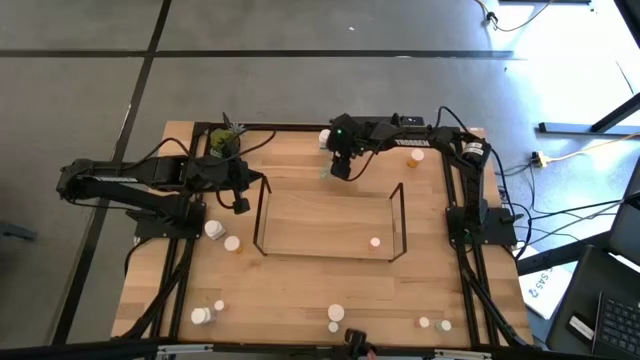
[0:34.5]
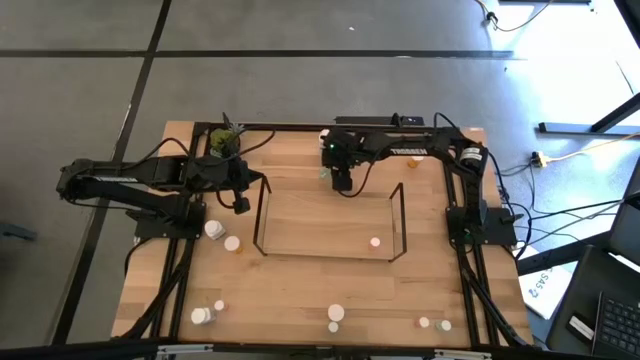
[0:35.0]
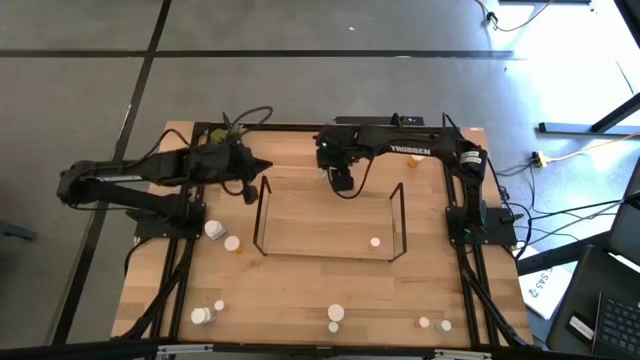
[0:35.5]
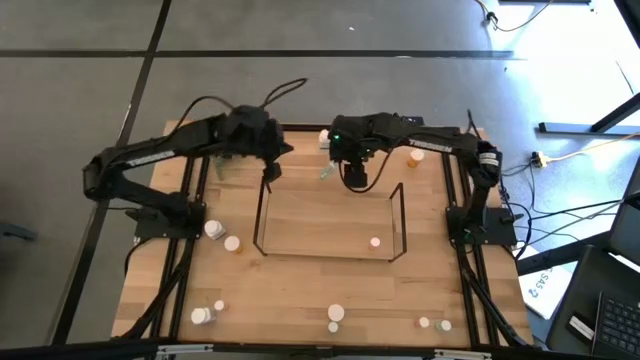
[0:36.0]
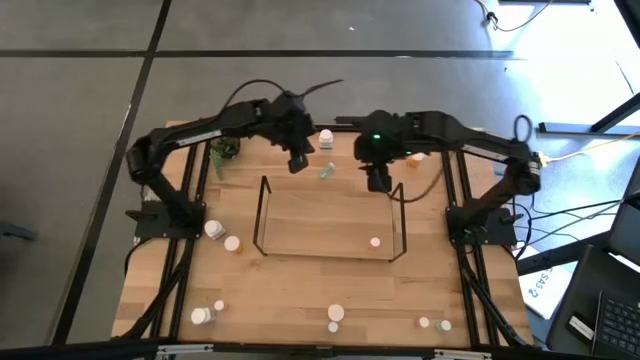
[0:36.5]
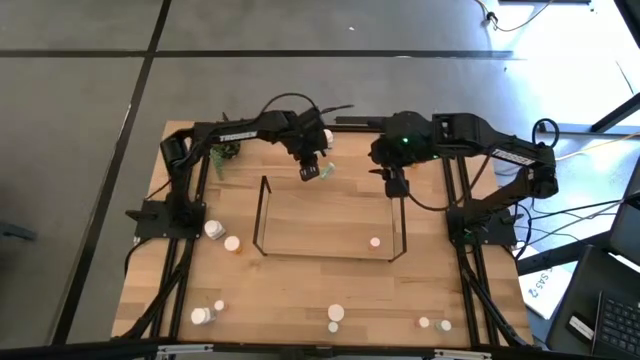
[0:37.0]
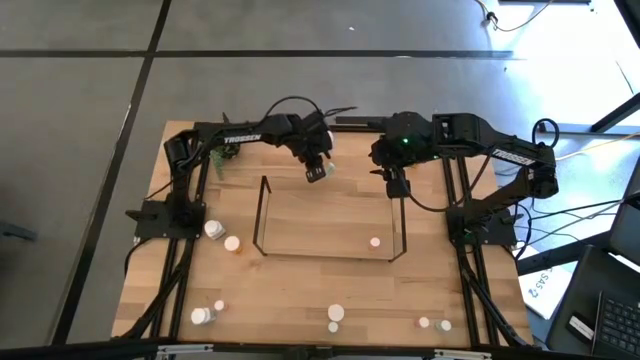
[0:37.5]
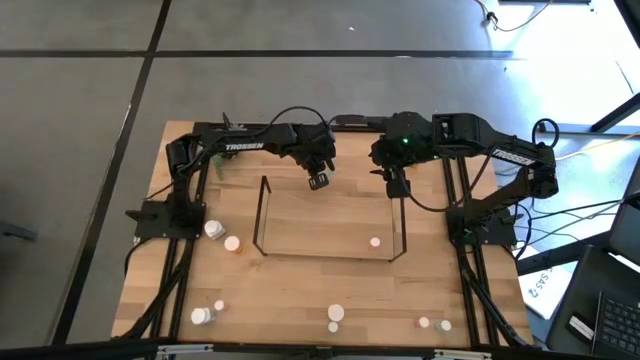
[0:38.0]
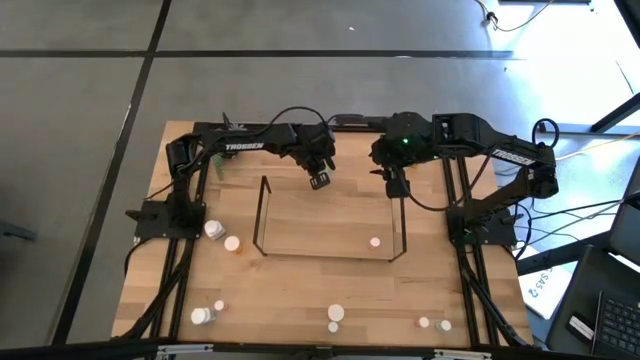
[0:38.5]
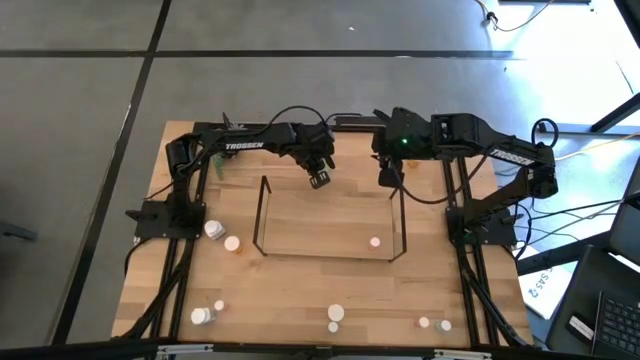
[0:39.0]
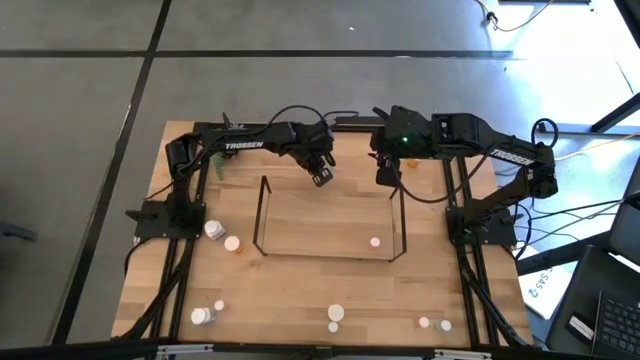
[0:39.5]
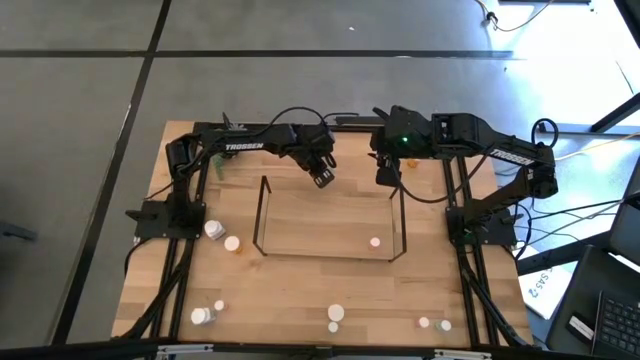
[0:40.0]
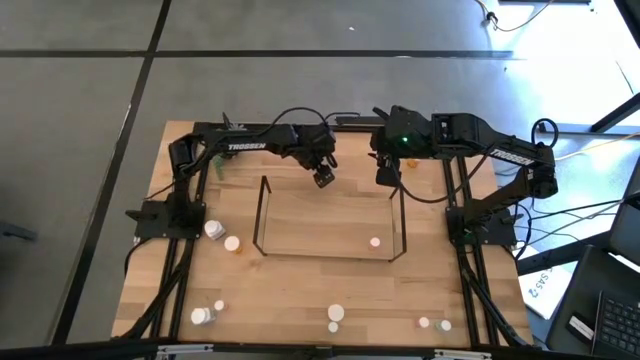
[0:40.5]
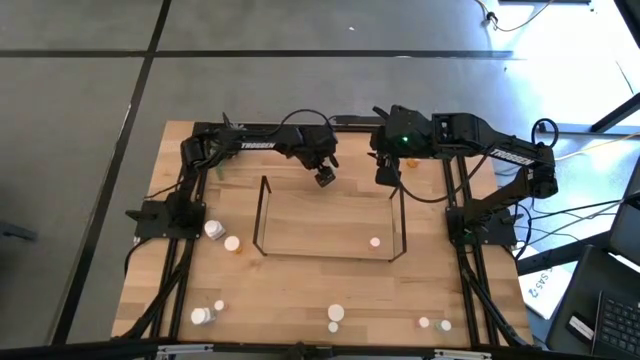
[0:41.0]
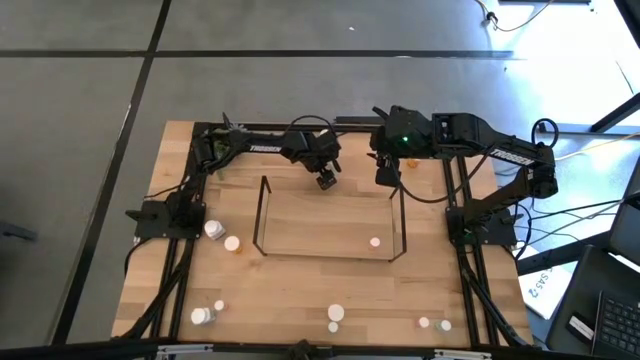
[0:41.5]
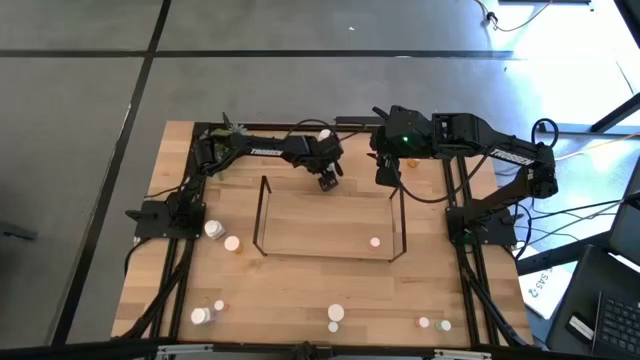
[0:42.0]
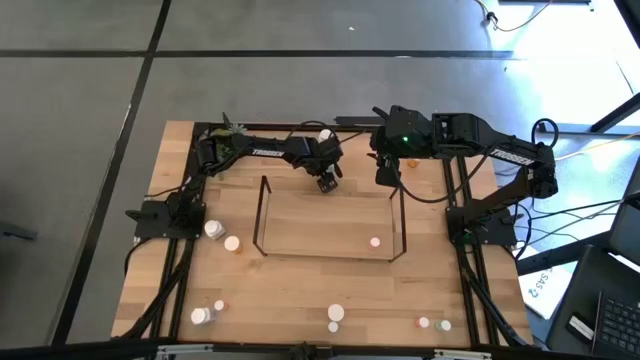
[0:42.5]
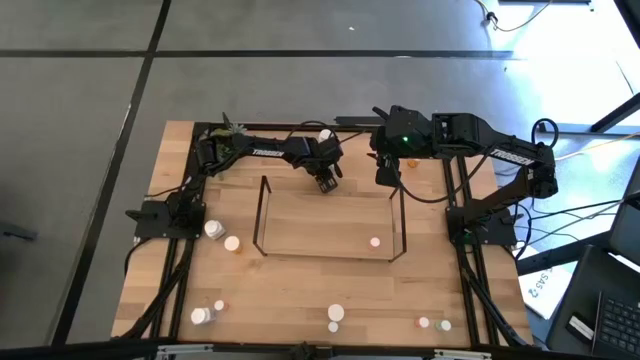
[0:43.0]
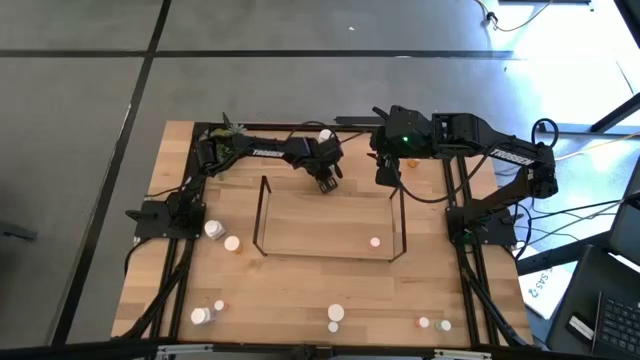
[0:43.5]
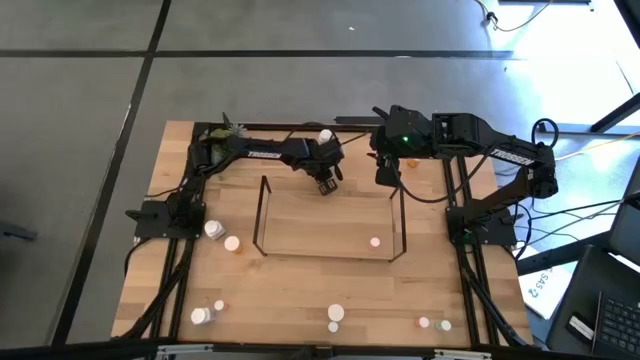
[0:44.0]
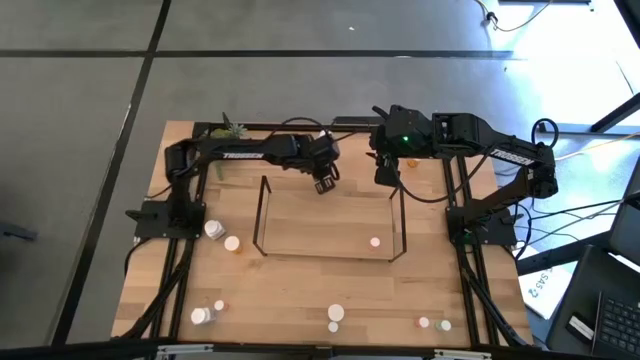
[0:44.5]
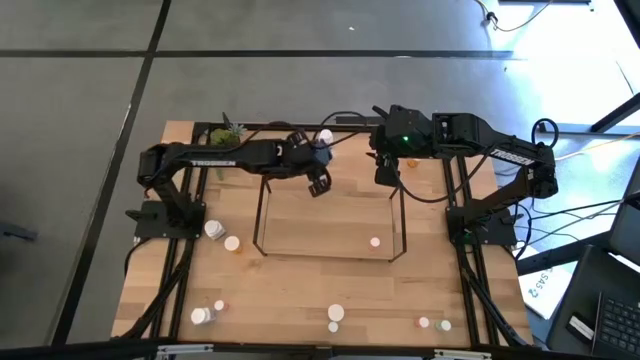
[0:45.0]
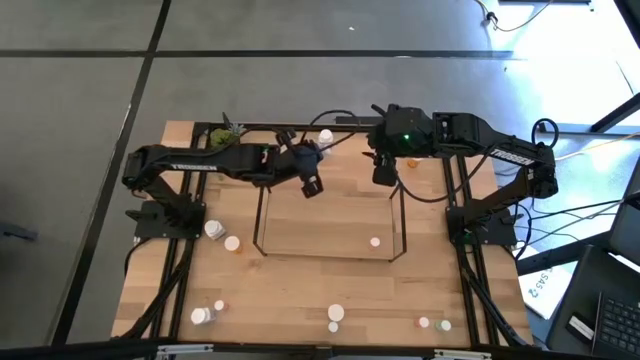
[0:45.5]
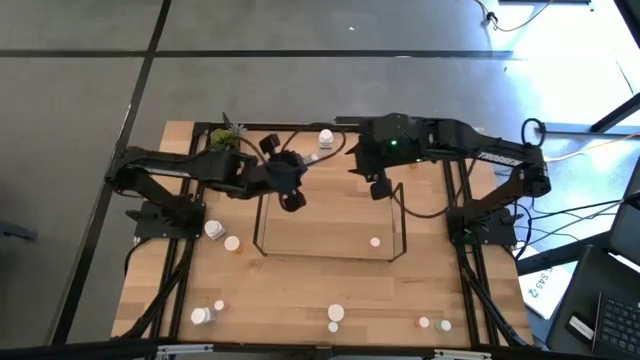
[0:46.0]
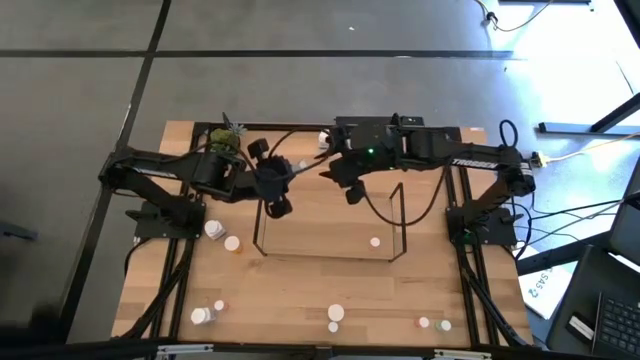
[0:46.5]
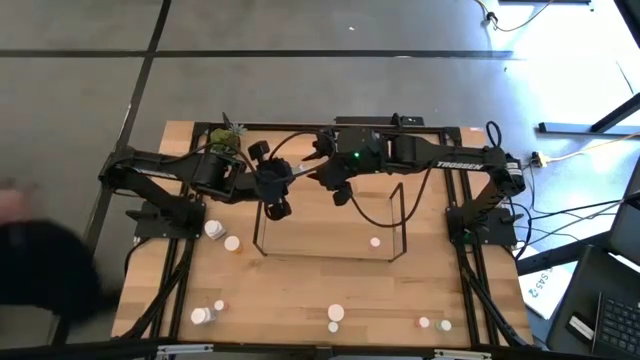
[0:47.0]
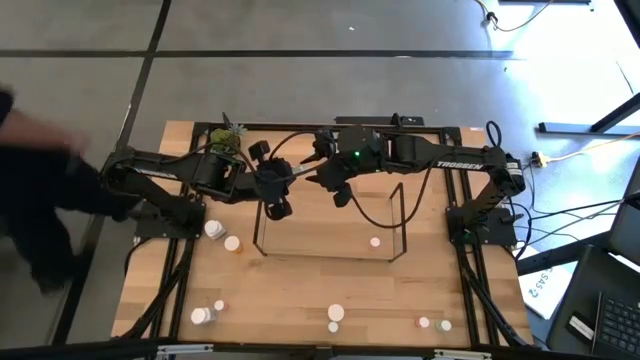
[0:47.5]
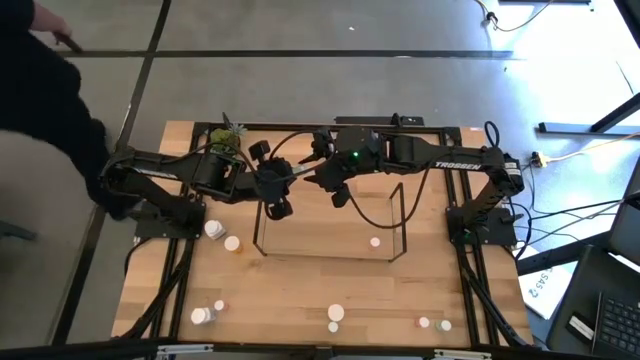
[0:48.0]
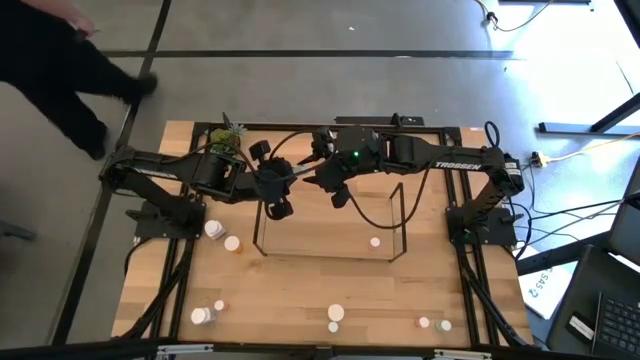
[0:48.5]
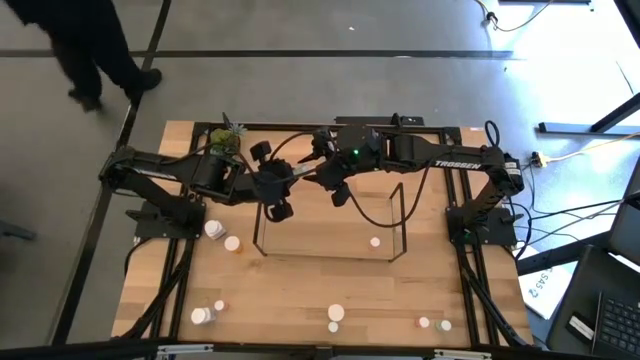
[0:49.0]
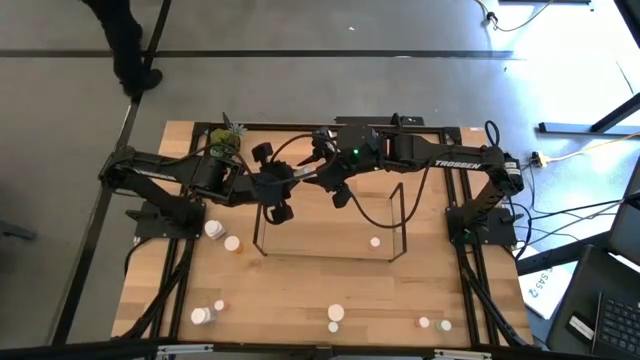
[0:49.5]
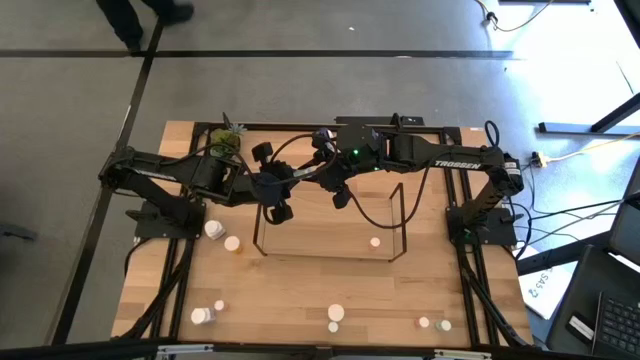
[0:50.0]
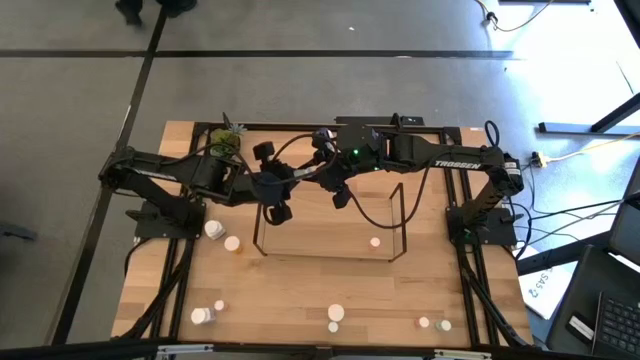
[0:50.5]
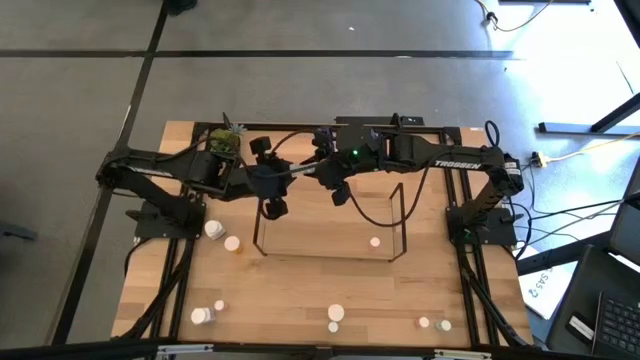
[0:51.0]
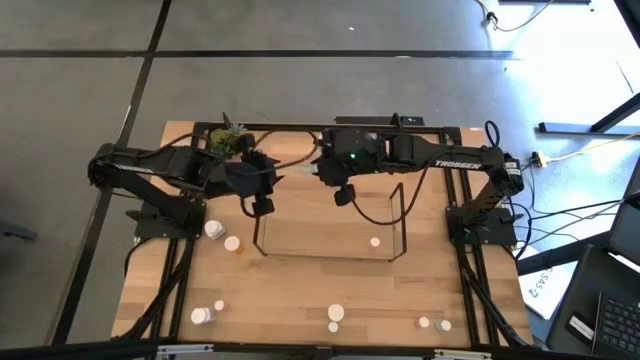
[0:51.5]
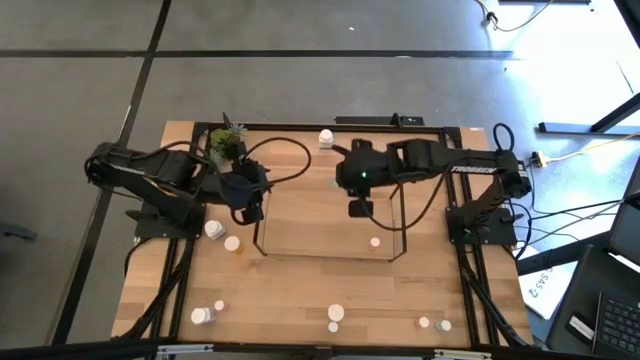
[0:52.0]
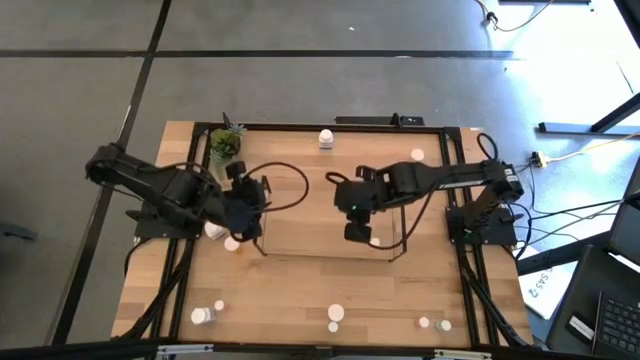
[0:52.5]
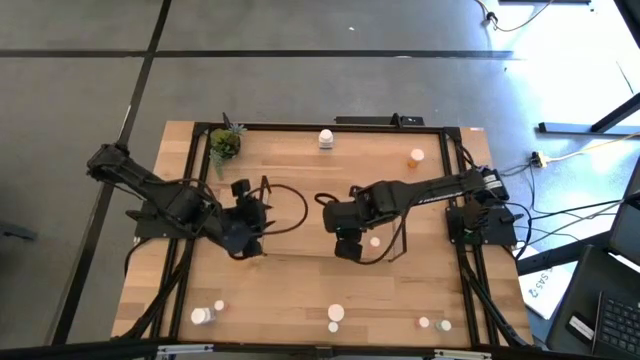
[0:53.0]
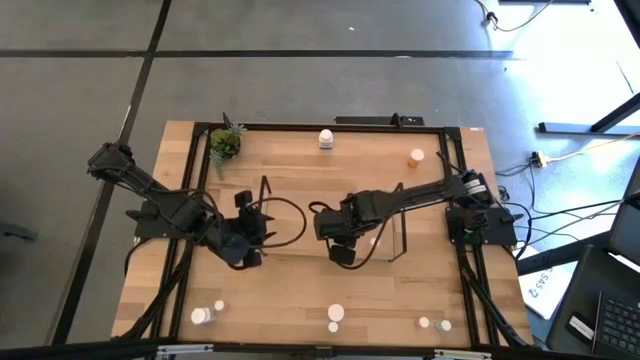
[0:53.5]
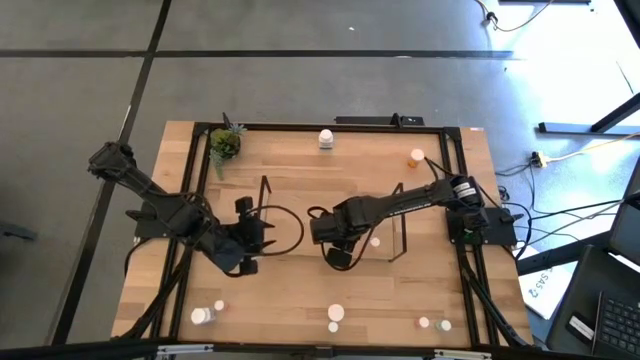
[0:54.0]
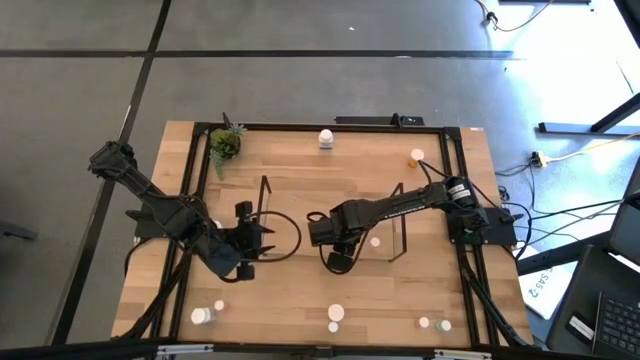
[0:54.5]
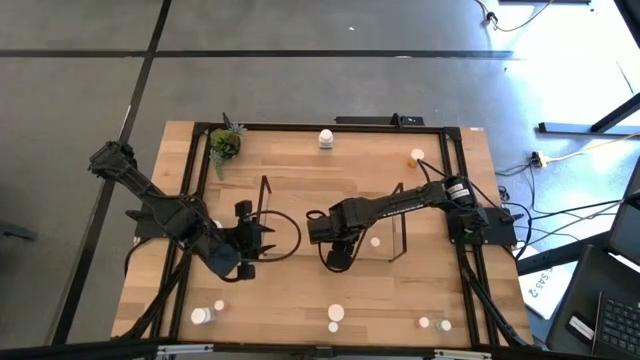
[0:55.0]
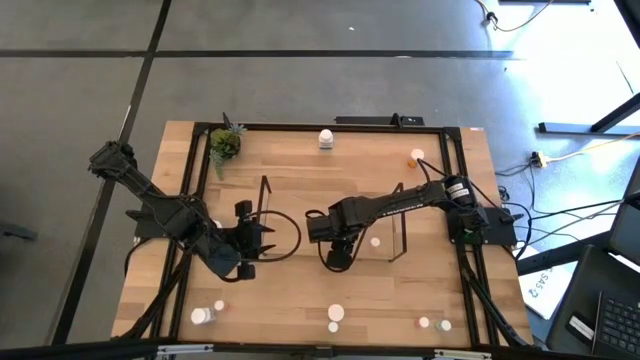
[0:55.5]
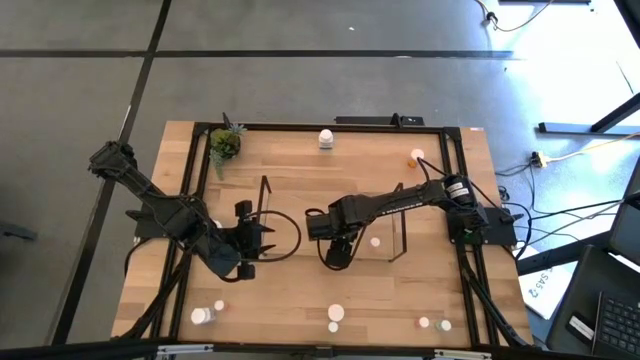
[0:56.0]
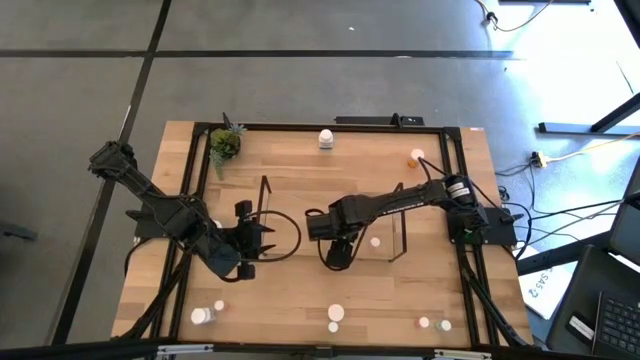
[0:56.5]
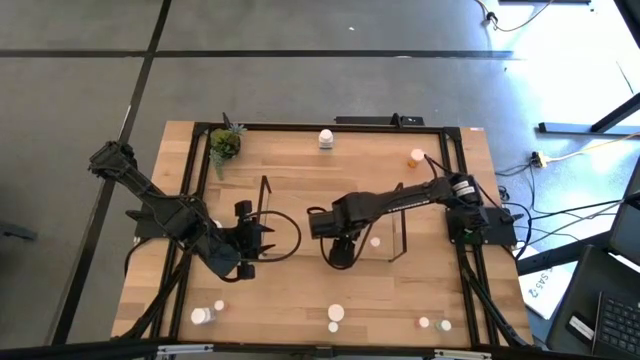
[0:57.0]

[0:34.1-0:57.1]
Task: Pick and place medicine bottles onto shelf by color
Put the top light blue pill bottle on the shelf
